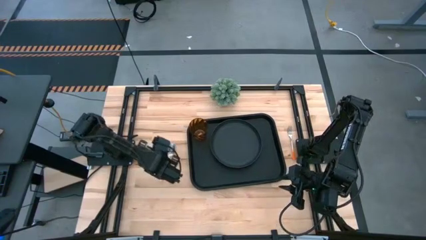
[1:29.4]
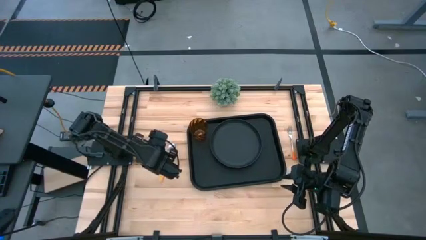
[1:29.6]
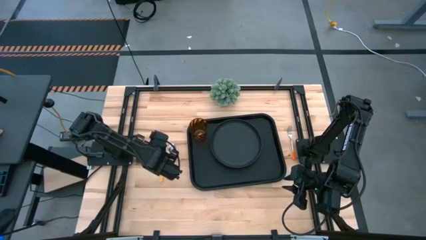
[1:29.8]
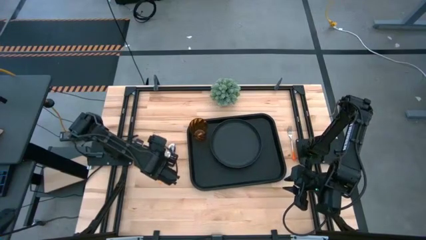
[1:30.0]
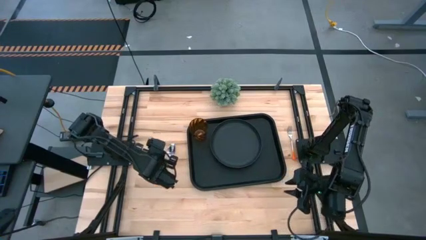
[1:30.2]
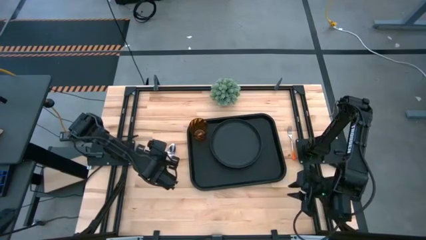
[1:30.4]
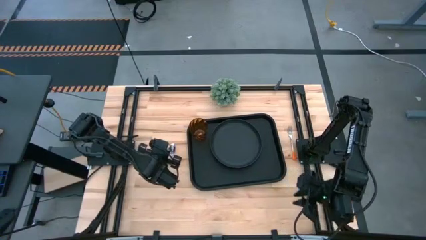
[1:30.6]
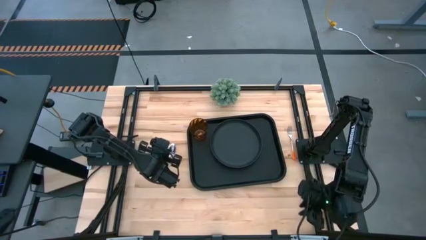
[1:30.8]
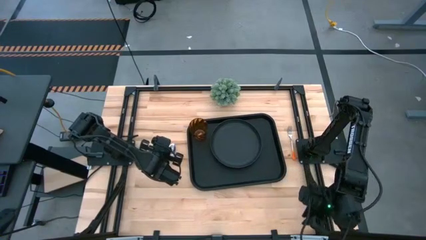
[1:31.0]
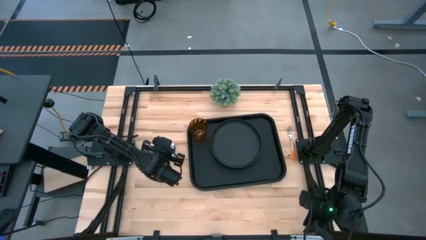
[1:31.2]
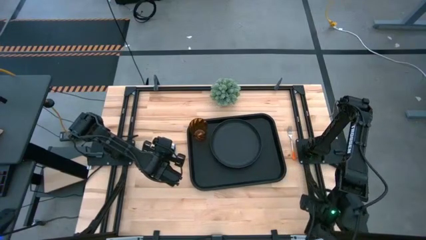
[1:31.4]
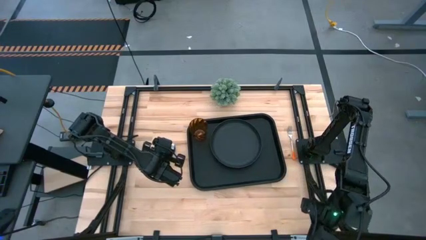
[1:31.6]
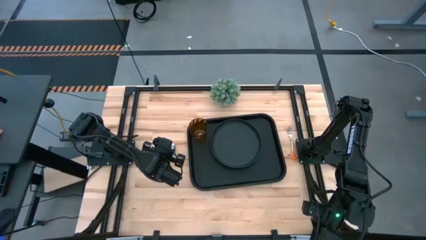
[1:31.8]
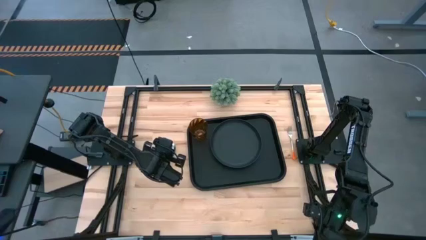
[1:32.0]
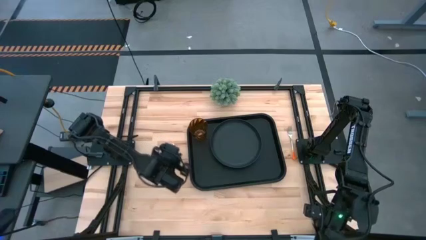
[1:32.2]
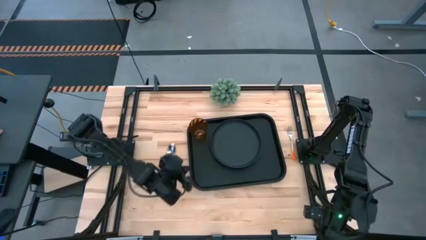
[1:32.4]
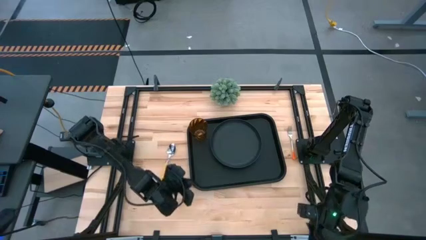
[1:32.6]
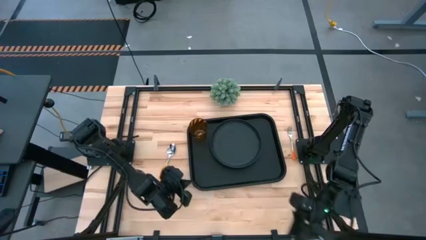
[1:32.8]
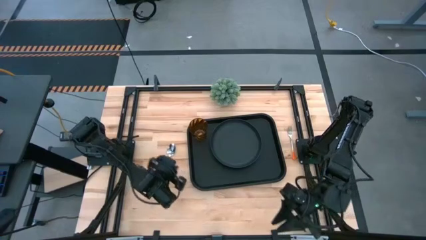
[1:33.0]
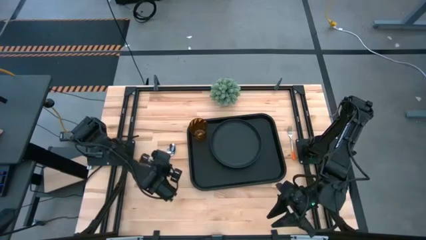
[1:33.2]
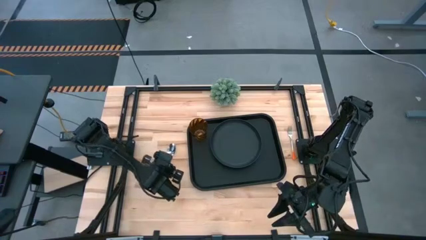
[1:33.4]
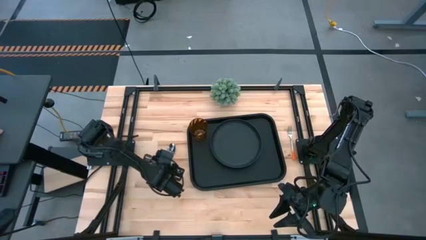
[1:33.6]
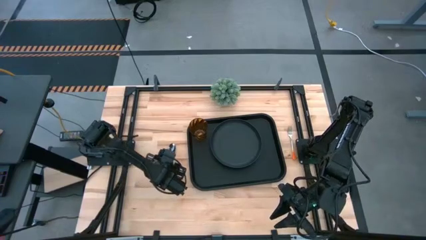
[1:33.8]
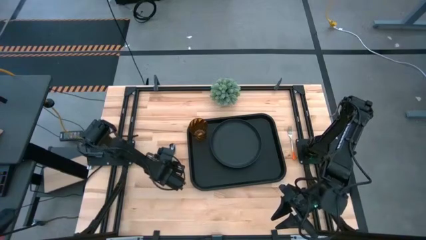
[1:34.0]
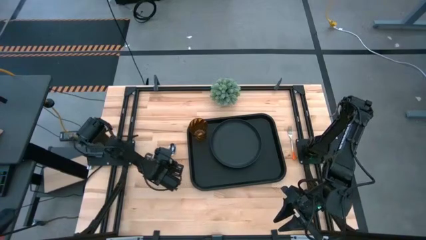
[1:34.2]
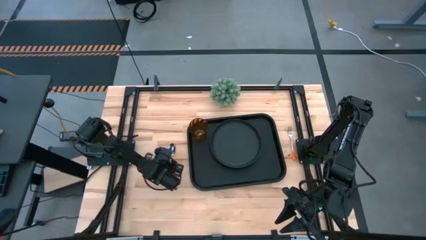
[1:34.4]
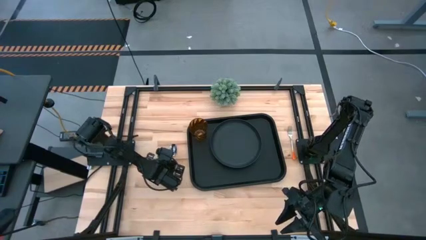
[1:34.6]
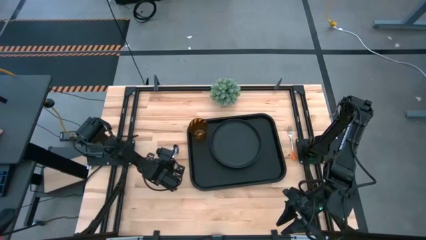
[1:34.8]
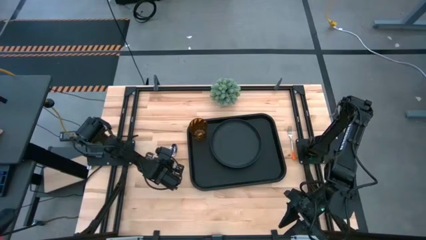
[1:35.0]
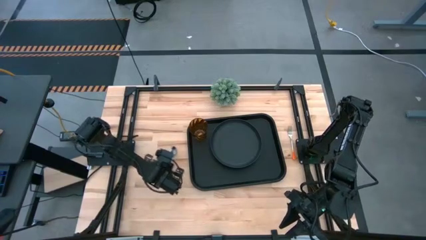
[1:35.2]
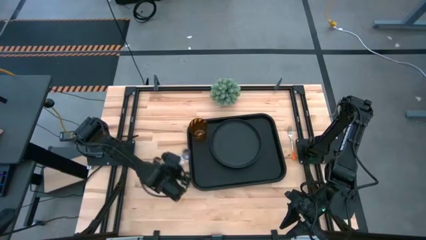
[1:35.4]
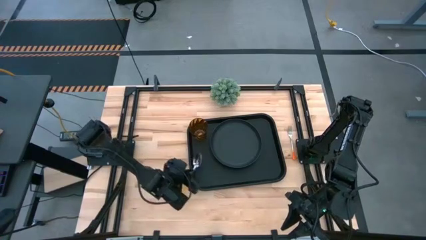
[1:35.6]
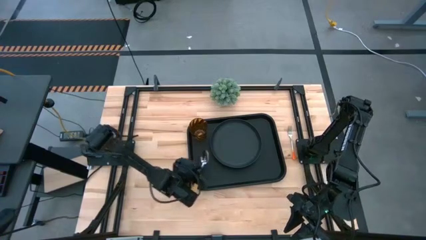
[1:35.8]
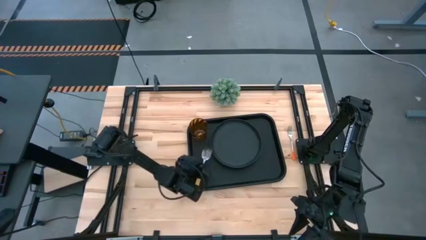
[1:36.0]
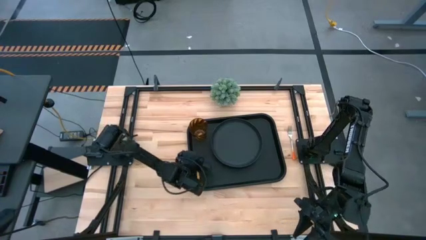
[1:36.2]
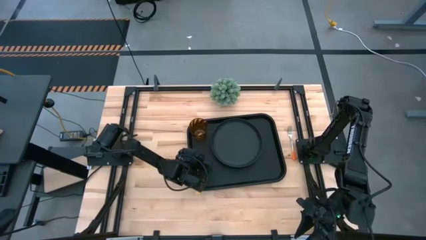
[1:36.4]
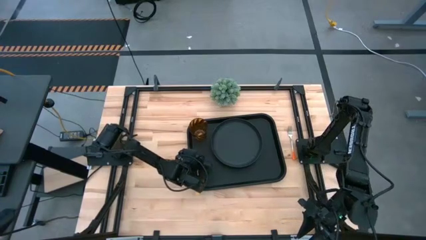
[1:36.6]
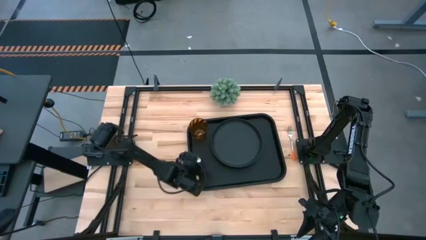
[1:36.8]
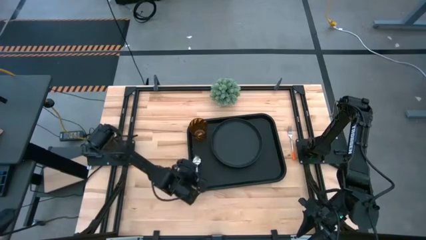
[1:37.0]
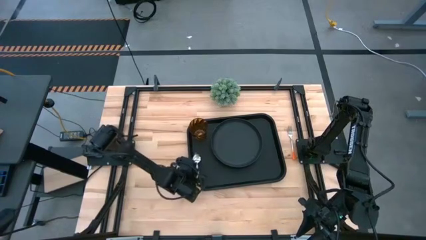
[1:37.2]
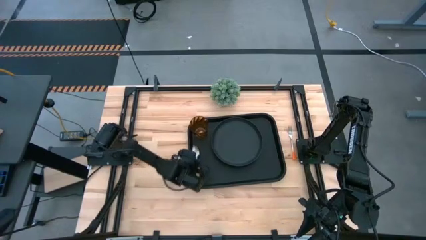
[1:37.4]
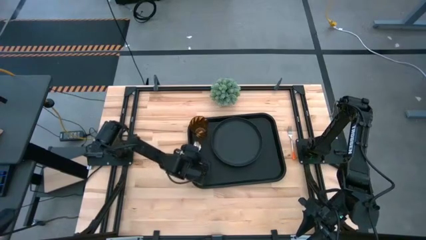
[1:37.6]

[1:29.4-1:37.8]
Task: Pick and place plate/cup/fork/spoon on tray
Put the orange spoon on the black serving tray to the left of the black plate

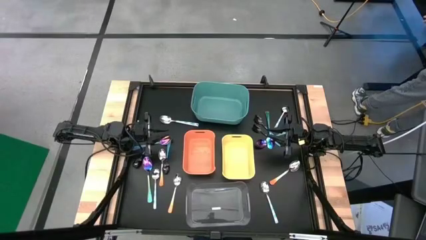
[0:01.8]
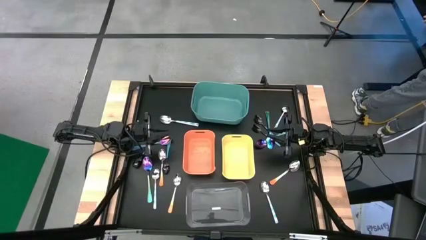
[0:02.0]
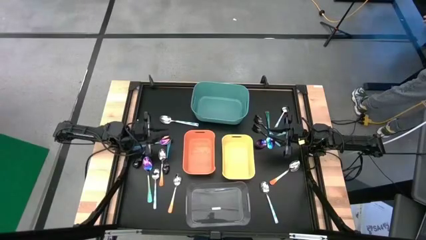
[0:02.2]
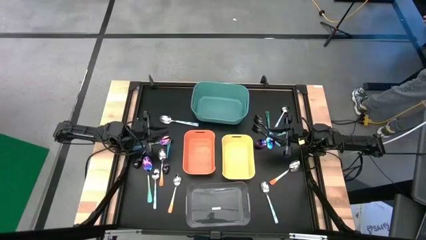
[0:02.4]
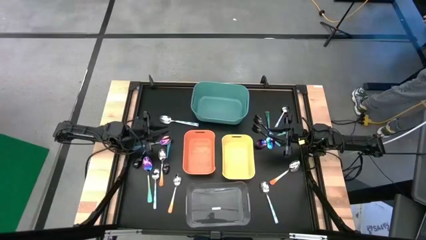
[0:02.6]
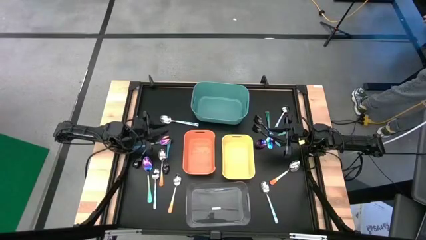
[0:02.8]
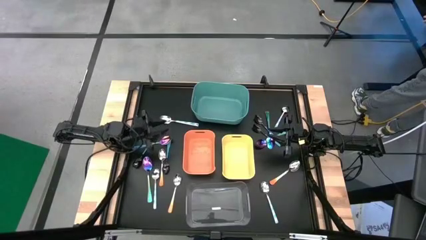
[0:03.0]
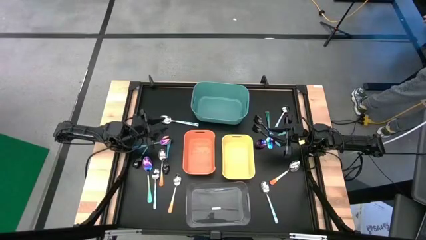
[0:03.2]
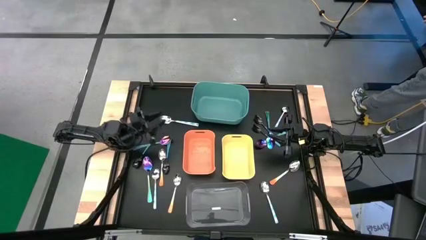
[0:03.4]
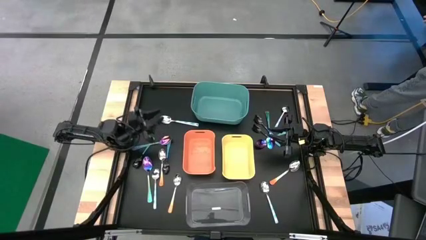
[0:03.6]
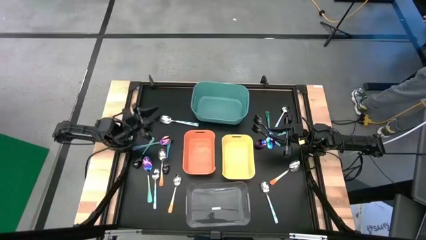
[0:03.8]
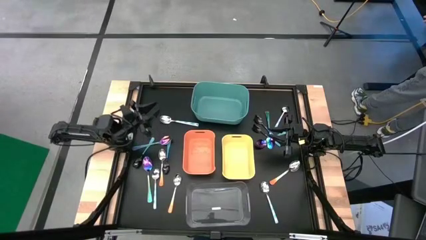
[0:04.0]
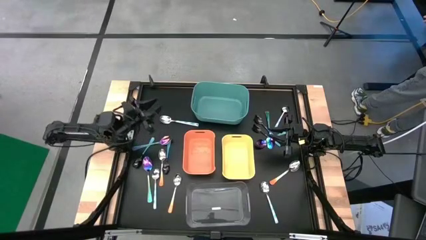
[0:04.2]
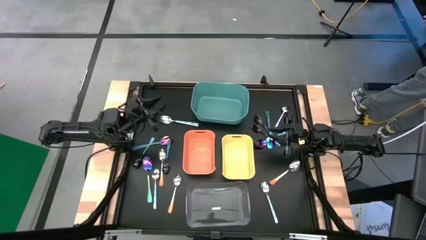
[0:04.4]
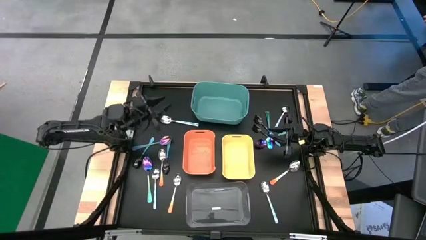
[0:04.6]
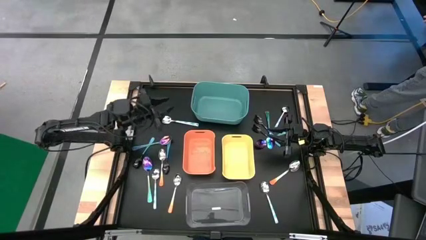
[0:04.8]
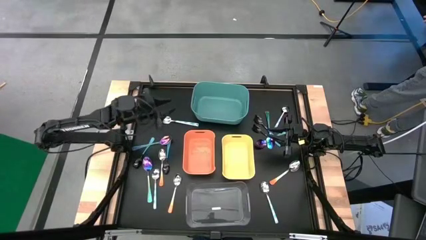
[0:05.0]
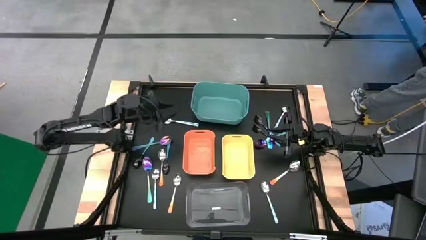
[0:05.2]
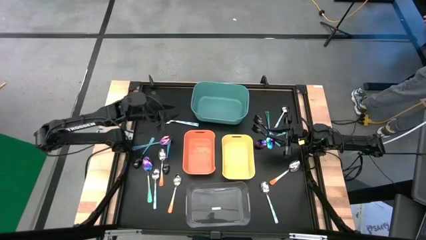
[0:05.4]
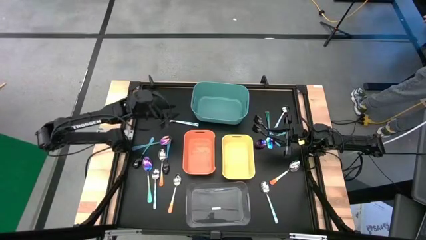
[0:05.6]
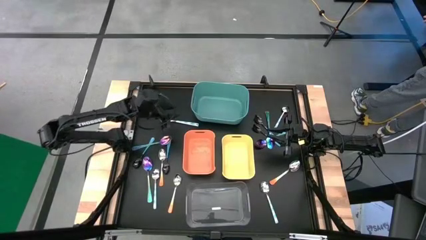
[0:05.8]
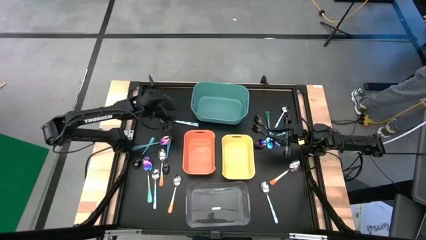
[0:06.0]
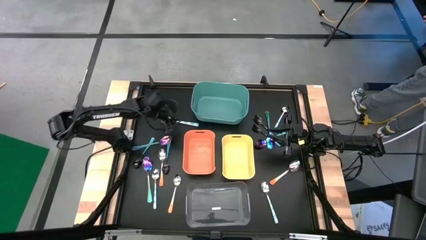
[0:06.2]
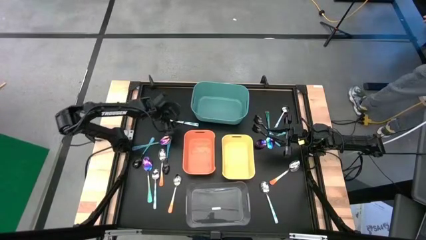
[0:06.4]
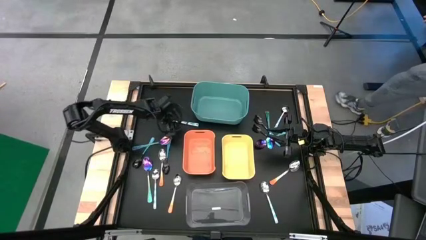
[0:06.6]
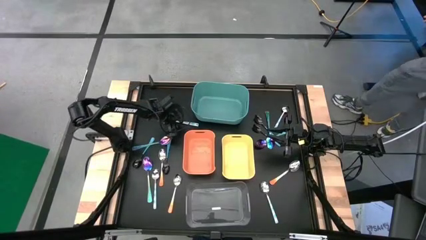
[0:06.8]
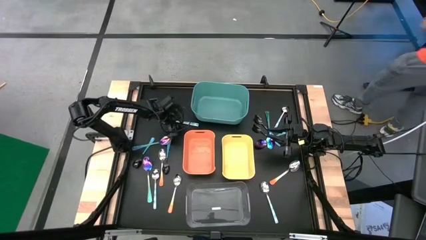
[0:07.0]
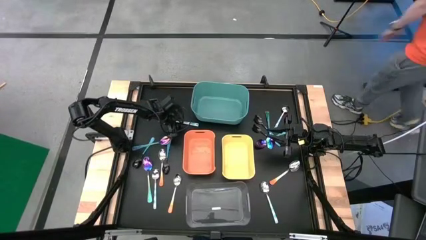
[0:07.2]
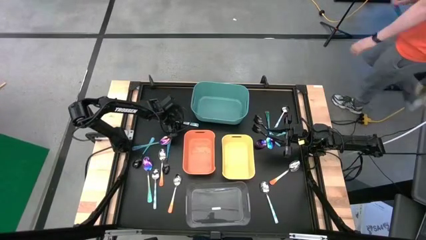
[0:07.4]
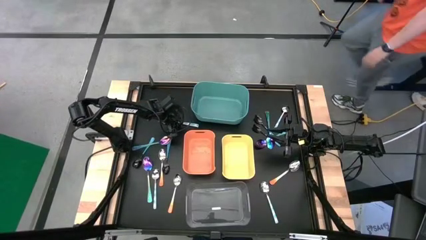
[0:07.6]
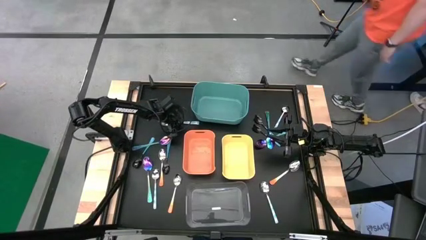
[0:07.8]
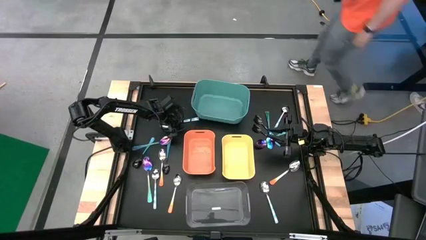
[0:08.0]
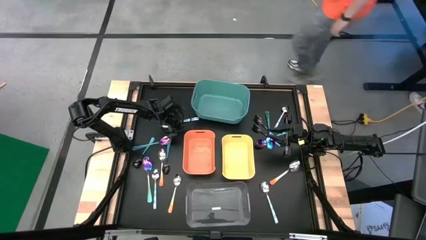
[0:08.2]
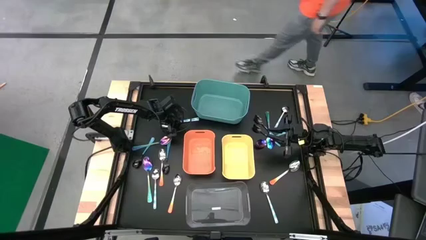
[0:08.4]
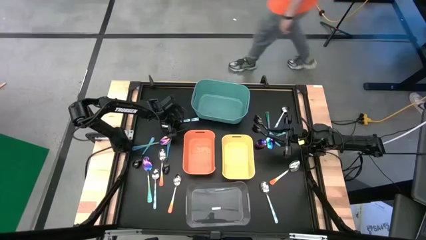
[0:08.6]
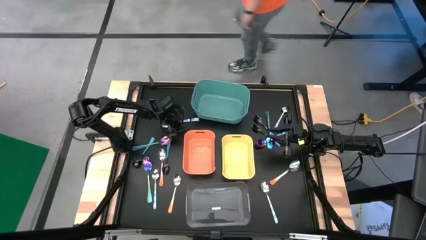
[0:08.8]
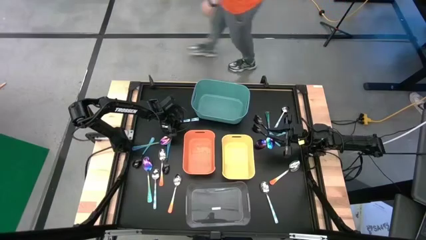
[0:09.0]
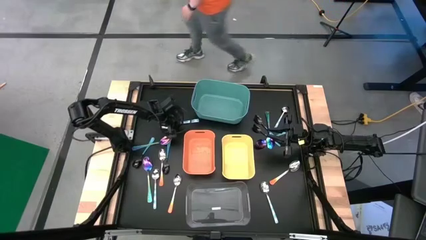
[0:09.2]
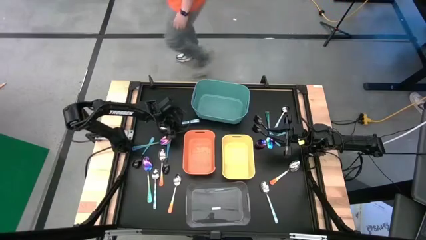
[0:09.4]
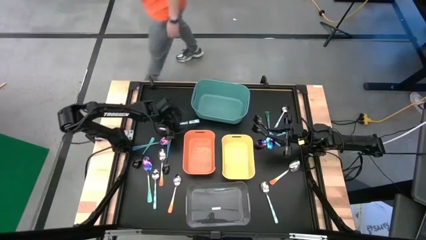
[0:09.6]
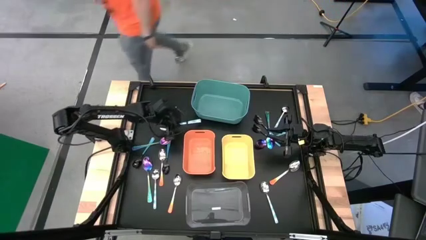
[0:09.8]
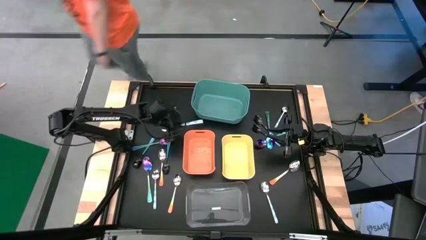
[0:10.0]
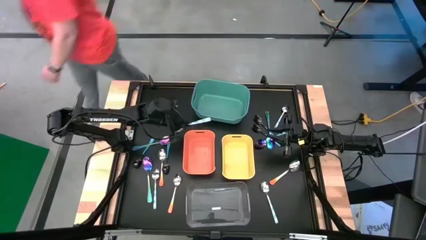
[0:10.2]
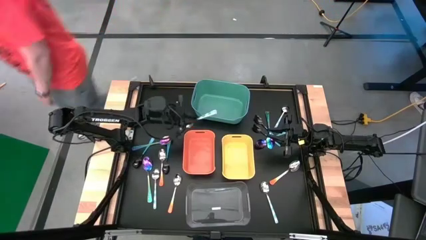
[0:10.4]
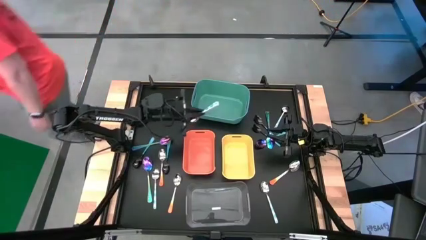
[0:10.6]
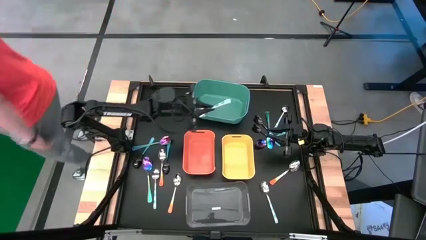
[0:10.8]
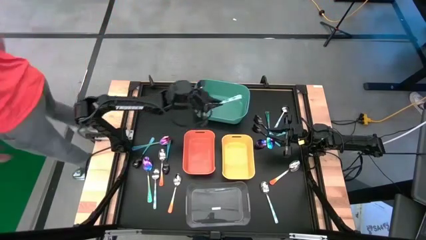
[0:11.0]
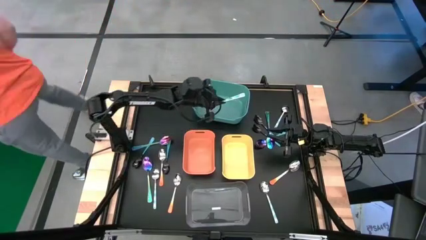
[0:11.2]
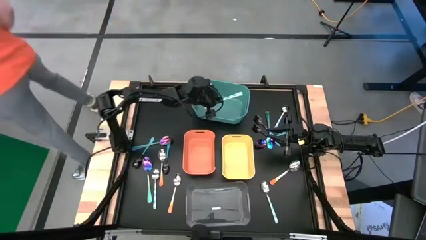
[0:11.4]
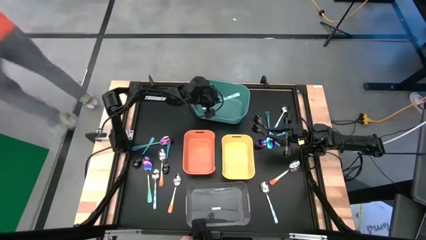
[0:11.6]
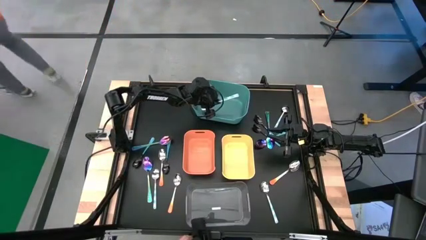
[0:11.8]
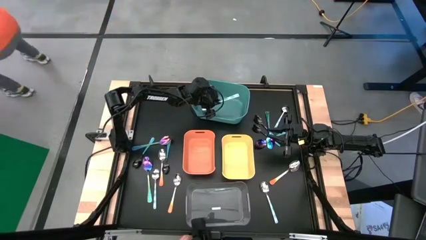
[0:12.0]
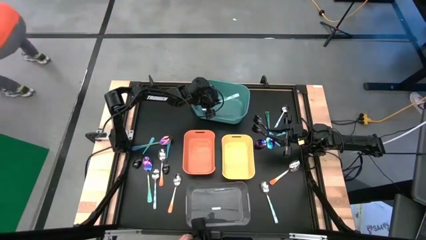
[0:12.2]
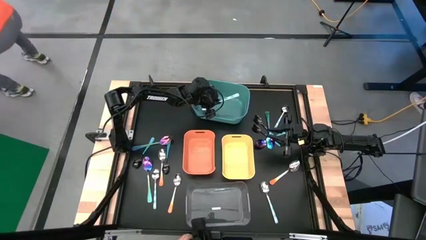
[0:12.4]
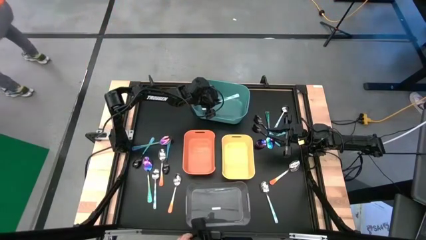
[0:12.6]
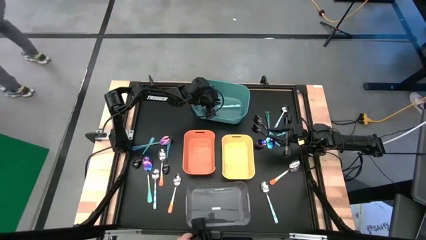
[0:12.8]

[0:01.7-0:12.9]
Task: Sort silverware by color (type)
Put the white patterned spoon into the green bin
